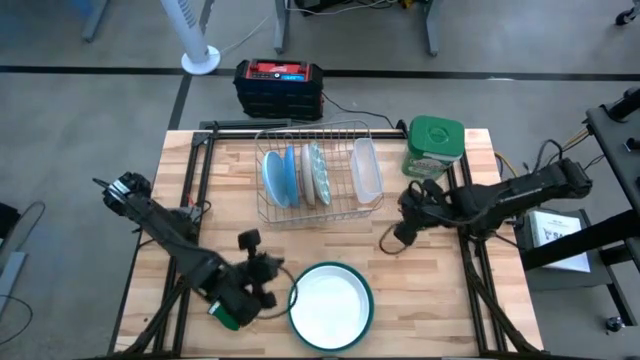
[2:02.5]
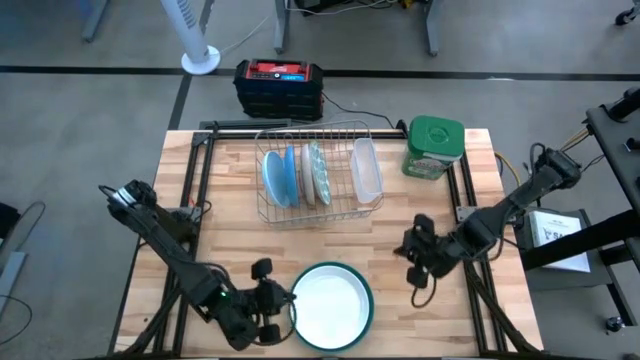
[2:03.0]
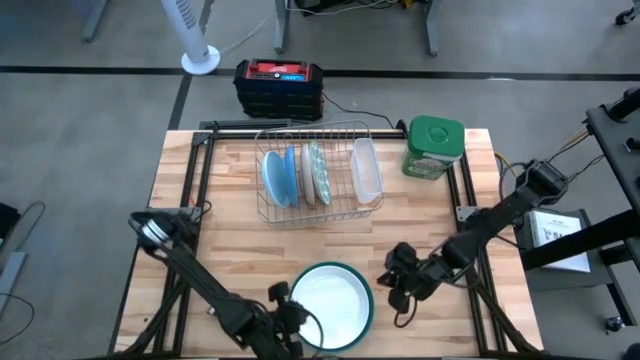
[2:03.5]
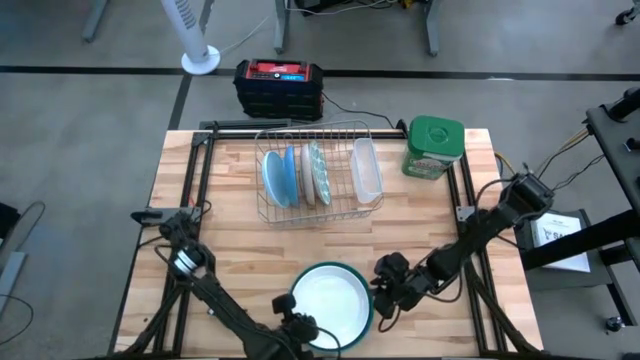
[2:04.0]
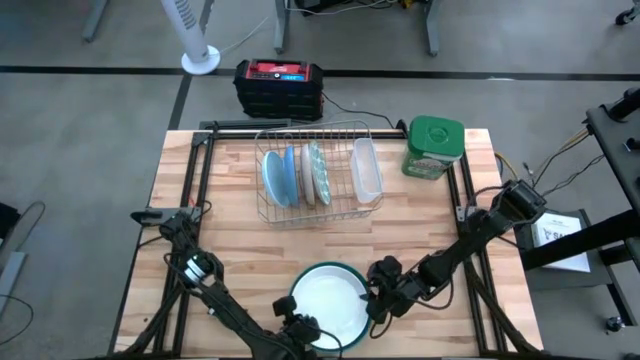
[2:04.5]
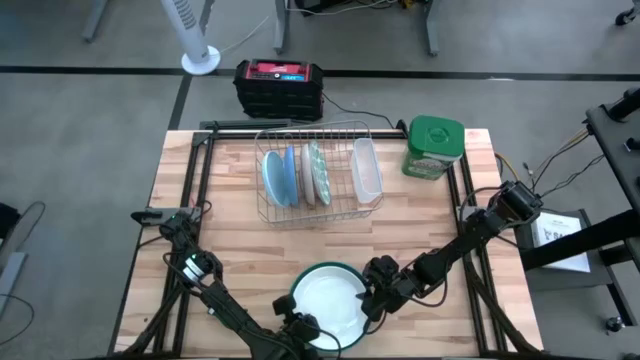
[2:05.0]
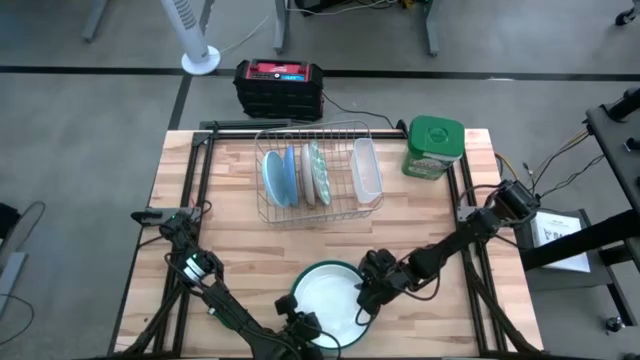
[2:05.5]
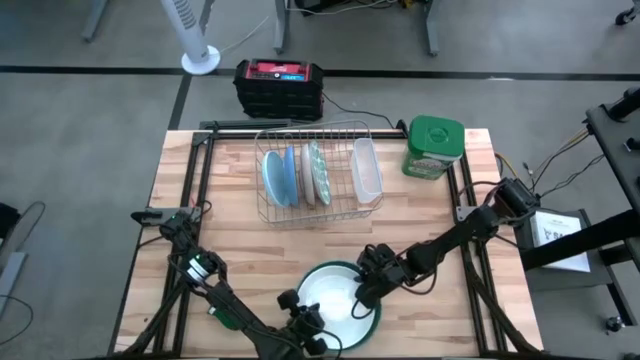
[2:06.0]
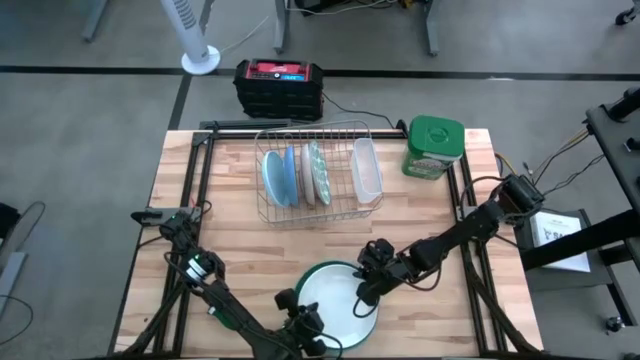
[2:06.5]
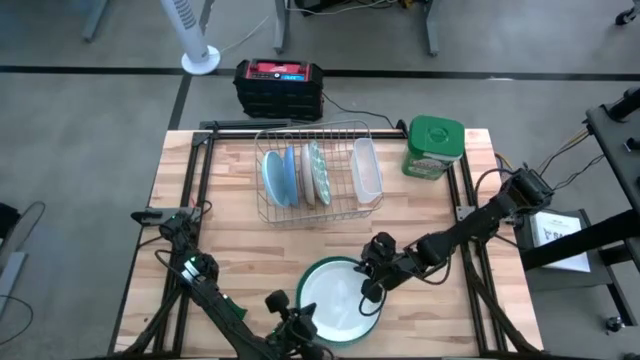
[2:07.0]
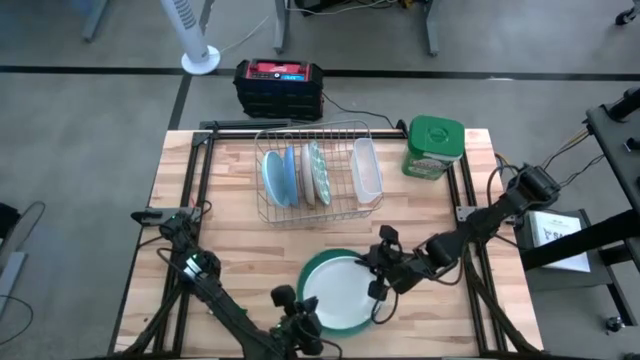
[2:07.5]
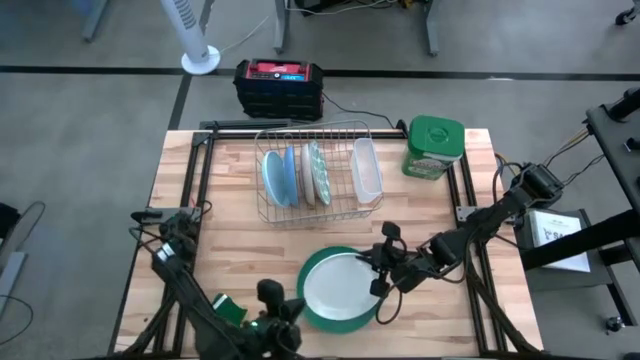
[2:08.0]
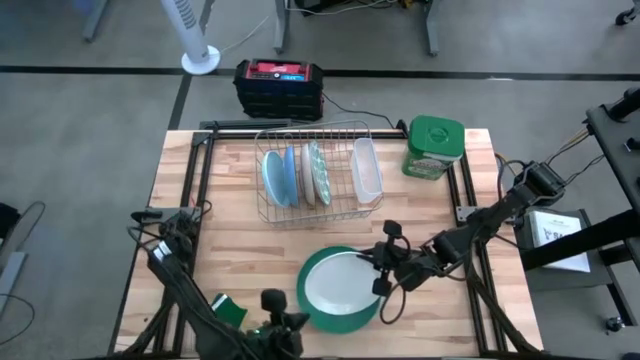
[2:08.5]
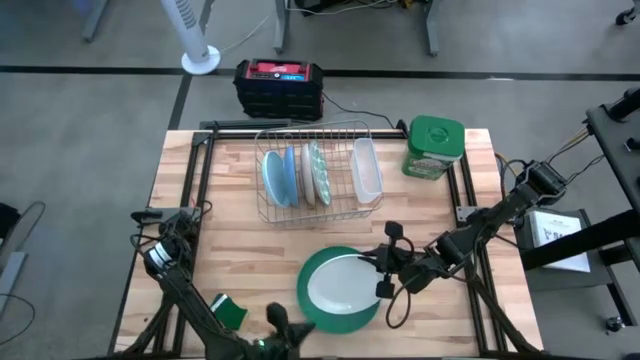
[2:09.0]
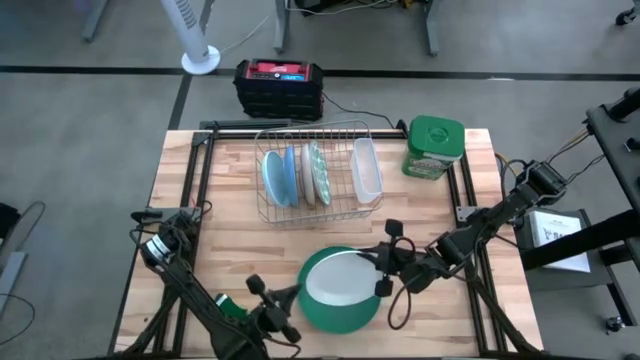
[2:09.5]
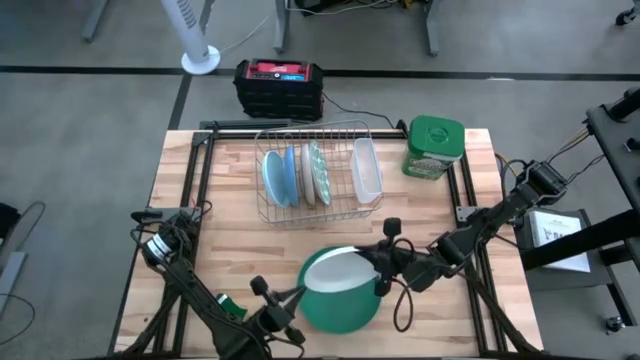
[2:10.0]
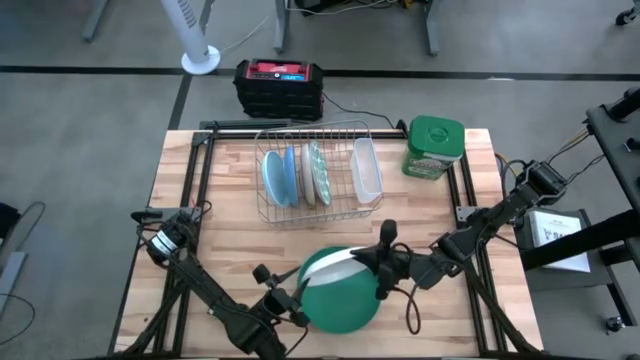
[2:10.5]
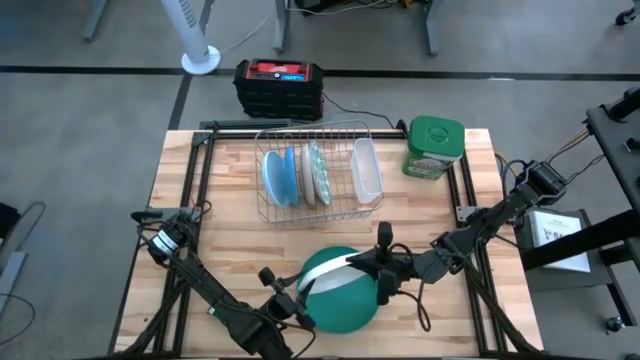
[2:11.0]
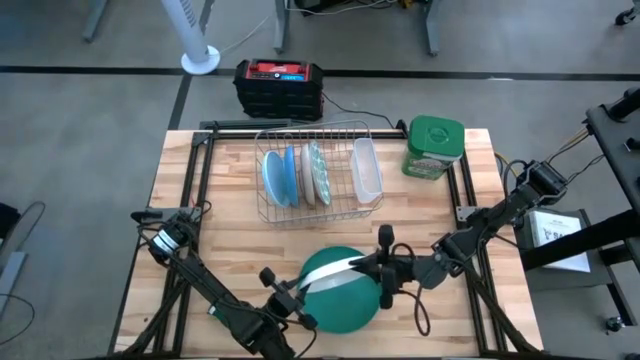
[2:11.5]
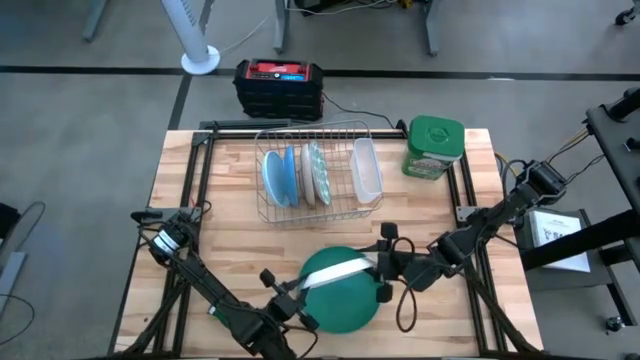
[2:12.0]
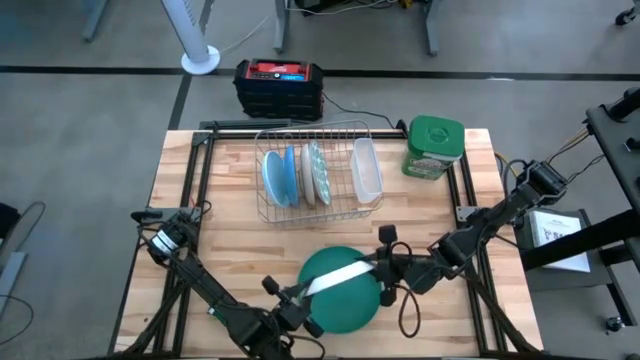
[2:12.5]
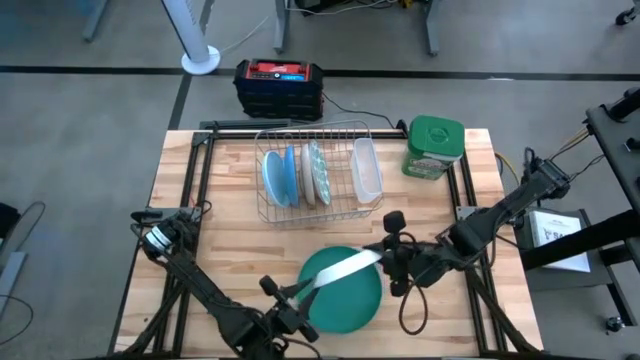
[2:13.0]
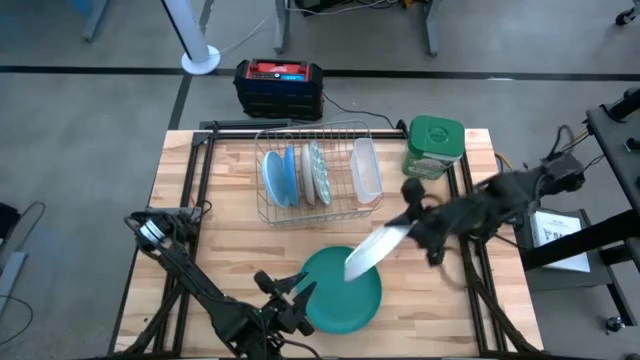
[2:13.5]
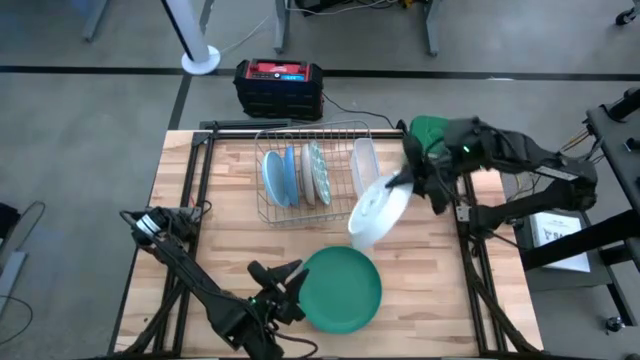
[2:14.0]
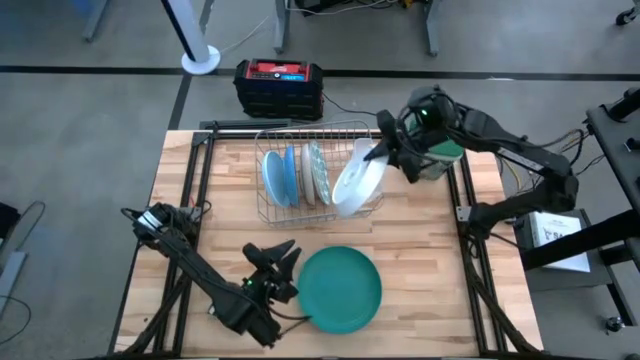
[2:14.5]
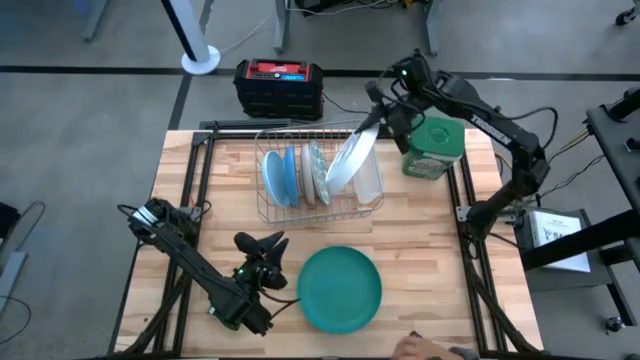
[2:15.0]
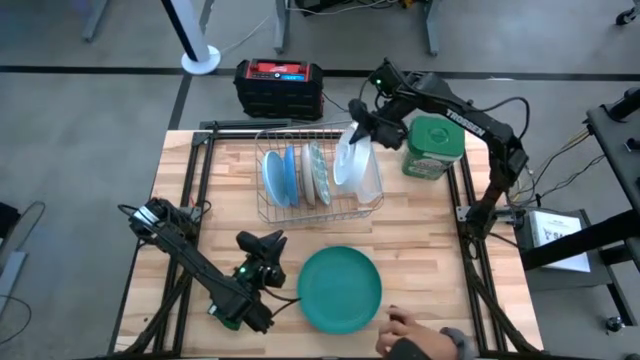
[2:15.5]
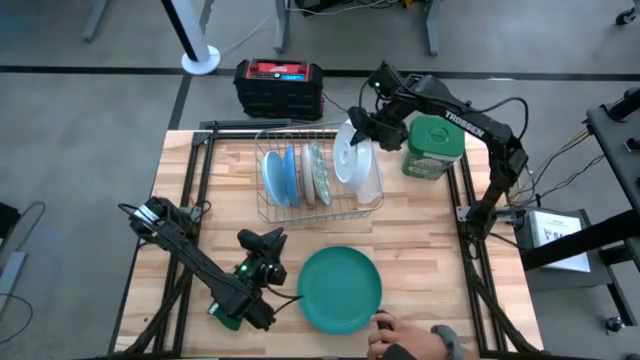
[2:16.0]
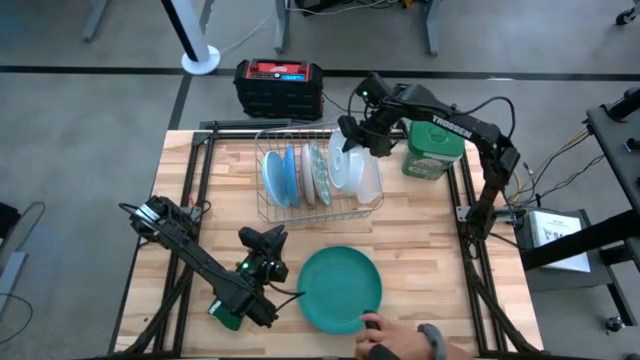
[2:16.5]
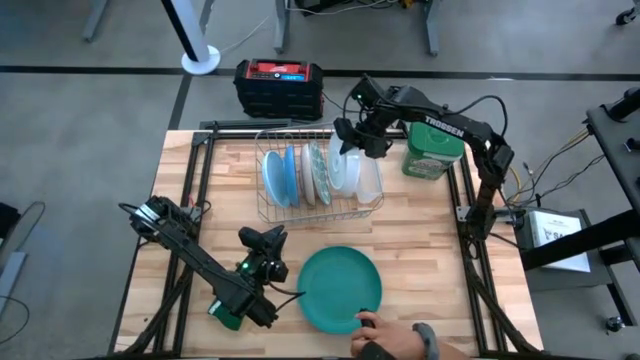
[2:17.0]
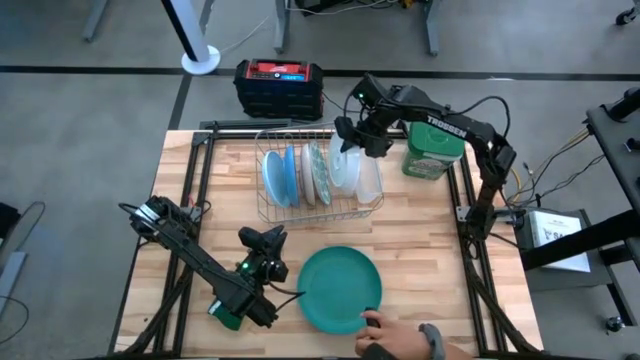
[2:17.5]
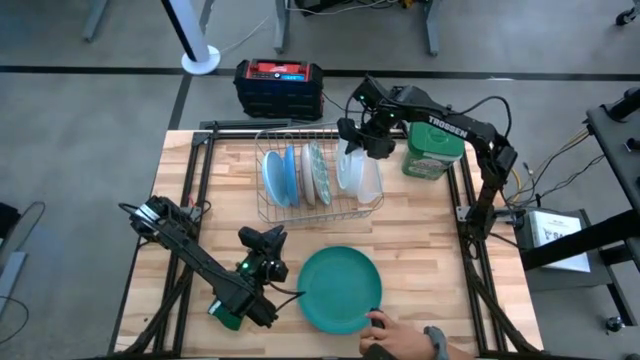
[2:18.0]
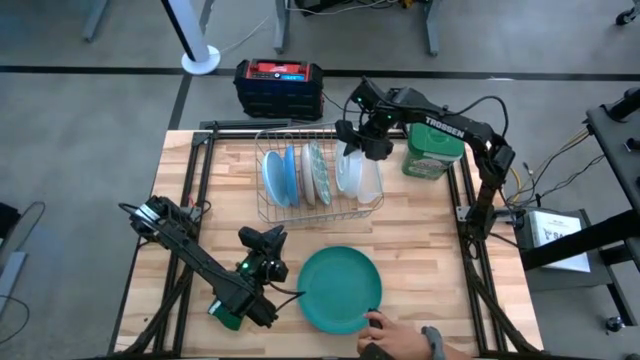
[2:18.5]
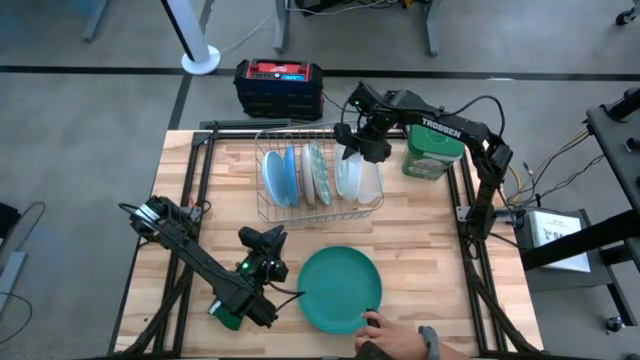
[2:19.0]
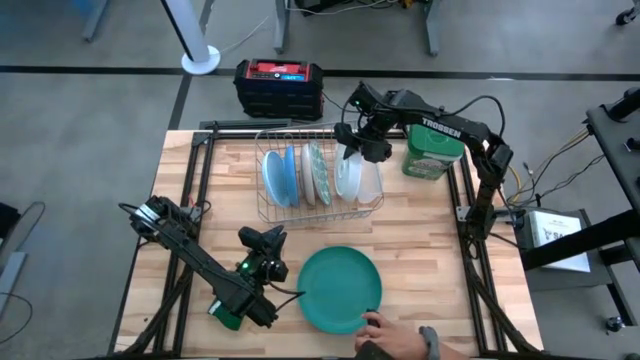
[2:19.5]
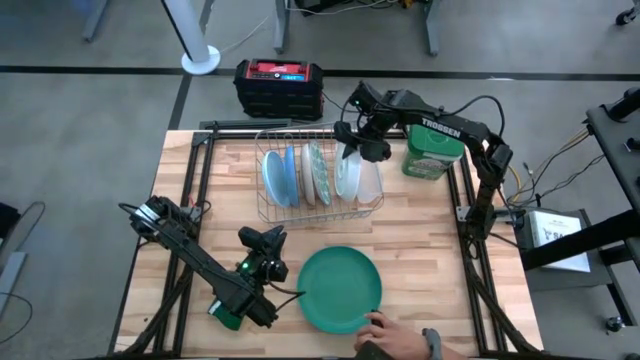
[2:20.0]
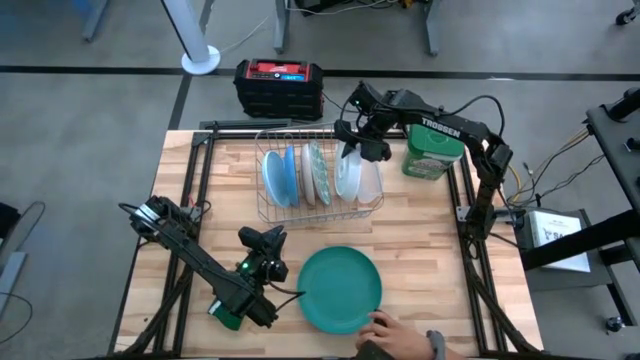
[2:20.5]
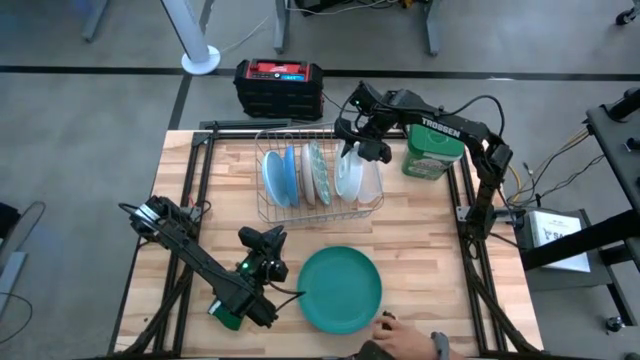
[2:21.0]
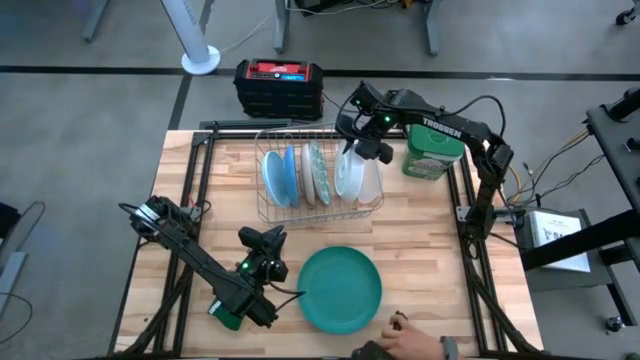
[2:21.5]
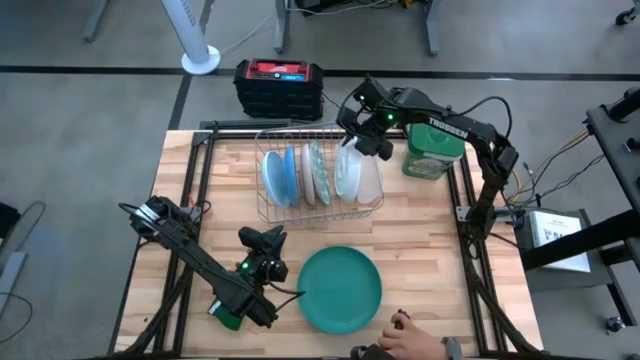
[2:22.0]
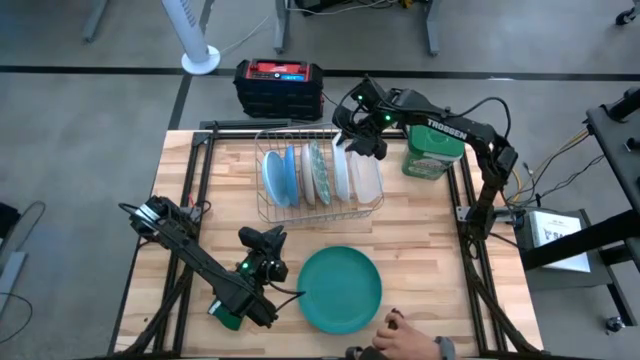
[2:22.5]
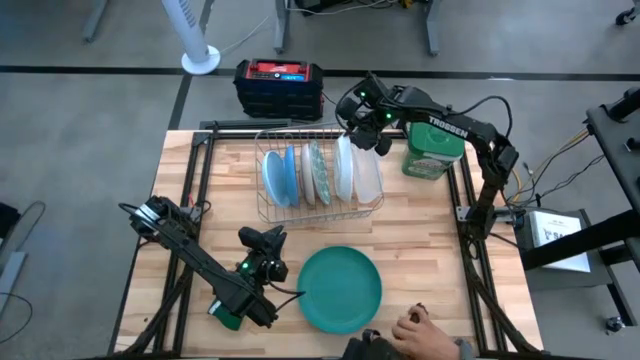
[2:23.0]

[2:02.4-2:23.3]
Task: Sort dishes
Put the white plate in the dish rack
